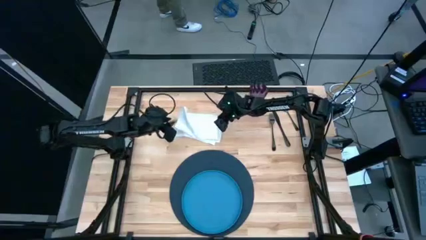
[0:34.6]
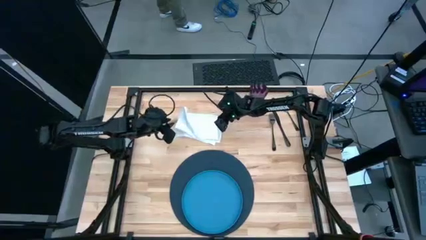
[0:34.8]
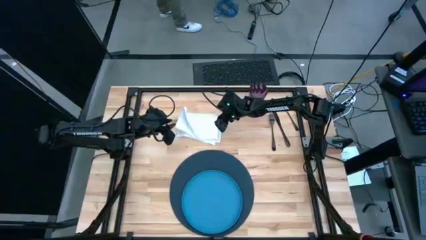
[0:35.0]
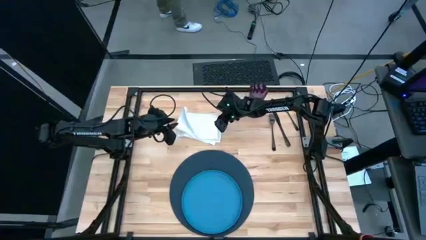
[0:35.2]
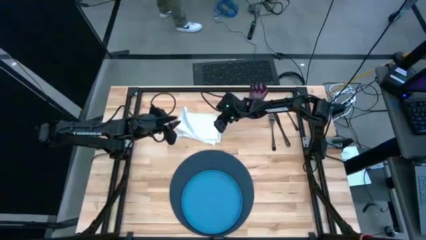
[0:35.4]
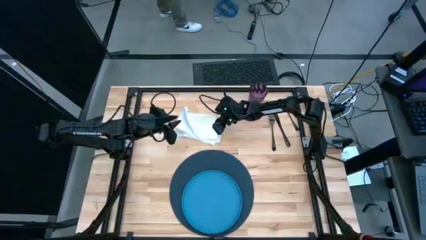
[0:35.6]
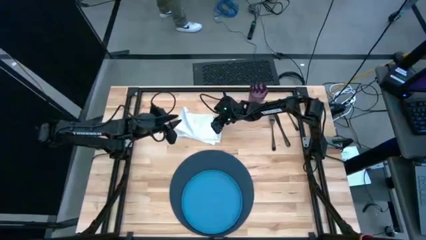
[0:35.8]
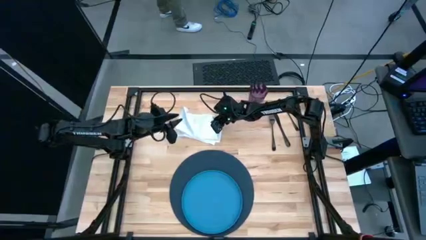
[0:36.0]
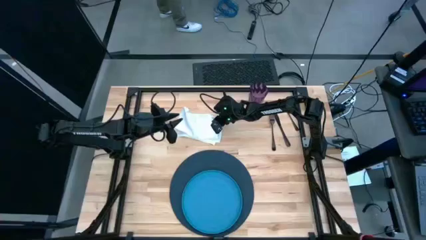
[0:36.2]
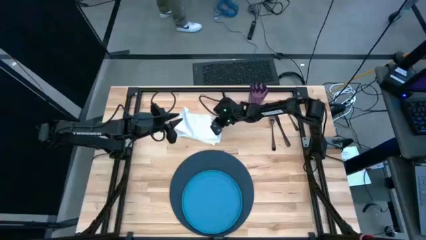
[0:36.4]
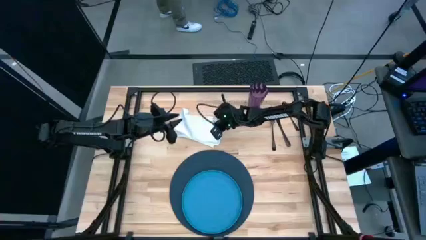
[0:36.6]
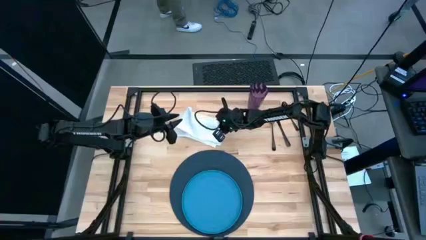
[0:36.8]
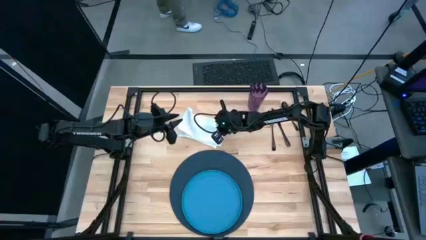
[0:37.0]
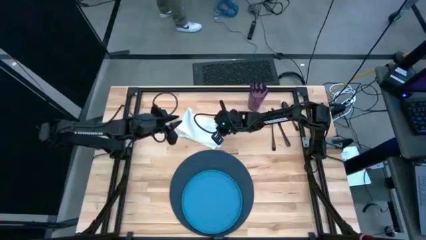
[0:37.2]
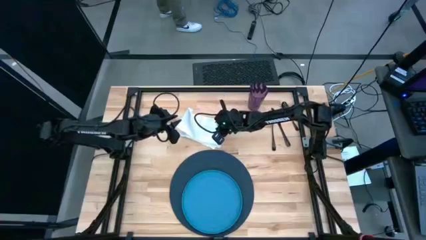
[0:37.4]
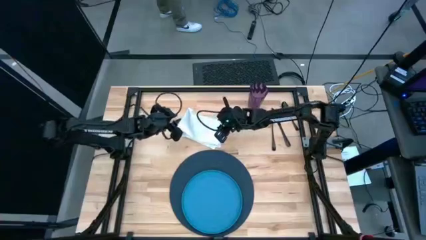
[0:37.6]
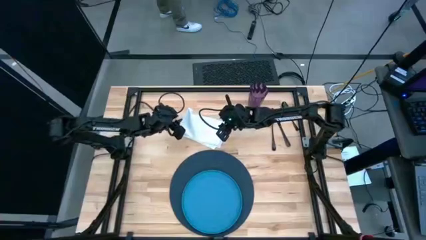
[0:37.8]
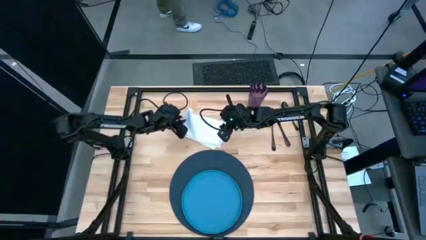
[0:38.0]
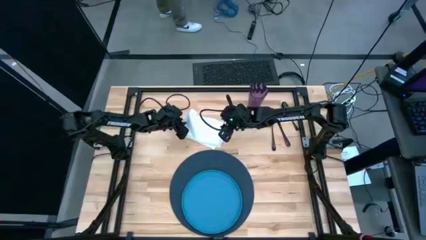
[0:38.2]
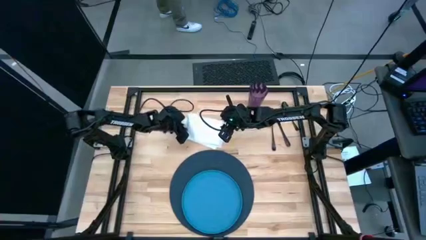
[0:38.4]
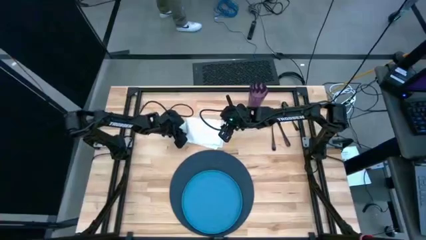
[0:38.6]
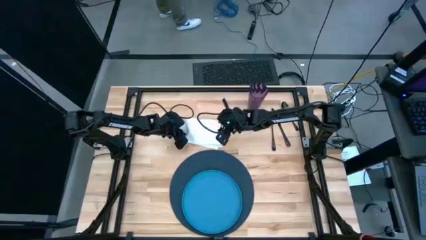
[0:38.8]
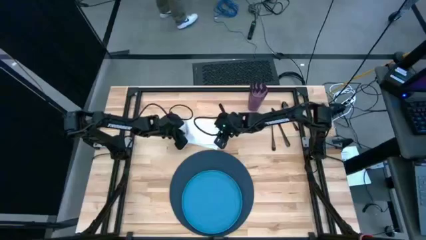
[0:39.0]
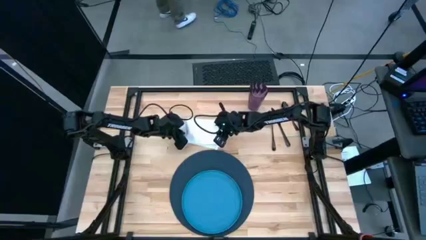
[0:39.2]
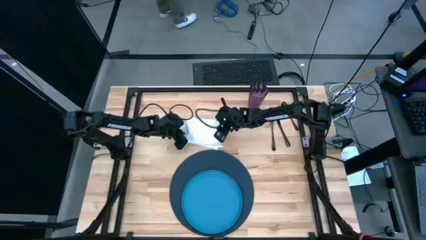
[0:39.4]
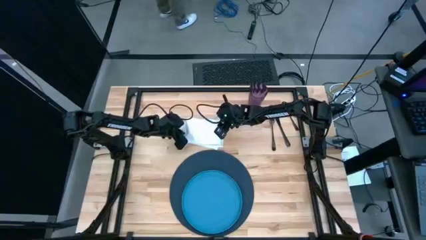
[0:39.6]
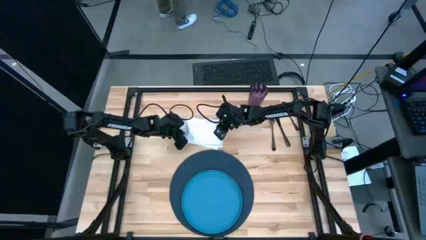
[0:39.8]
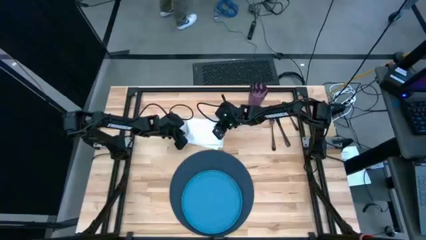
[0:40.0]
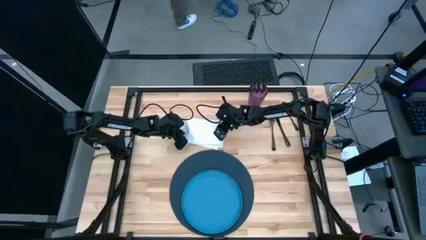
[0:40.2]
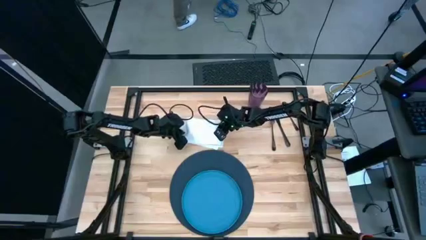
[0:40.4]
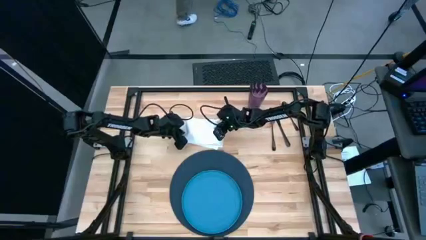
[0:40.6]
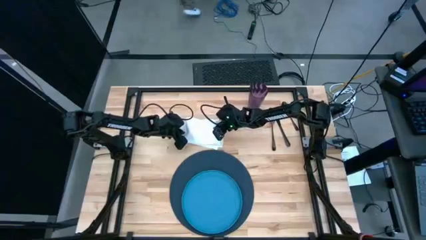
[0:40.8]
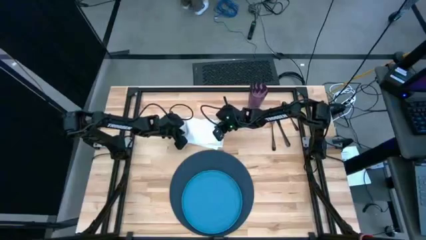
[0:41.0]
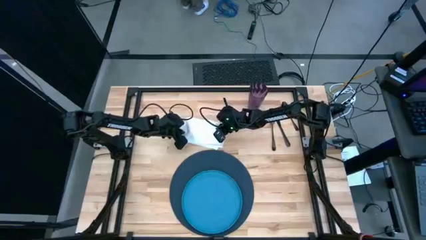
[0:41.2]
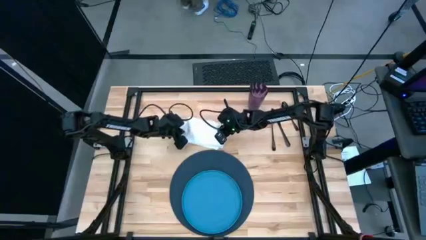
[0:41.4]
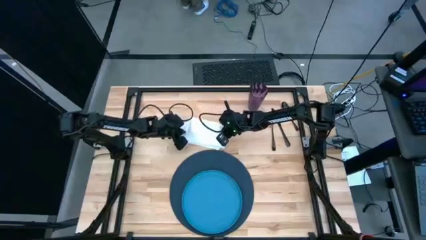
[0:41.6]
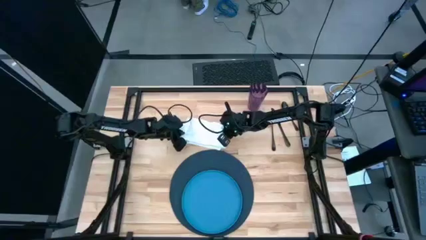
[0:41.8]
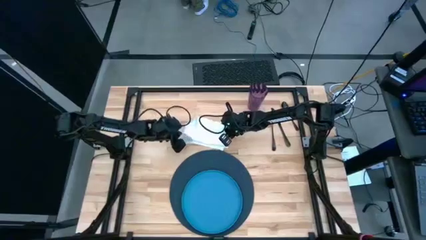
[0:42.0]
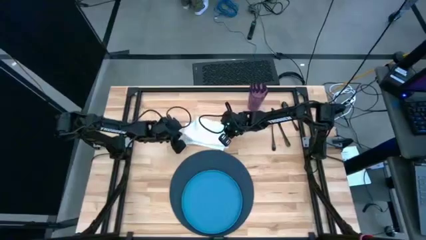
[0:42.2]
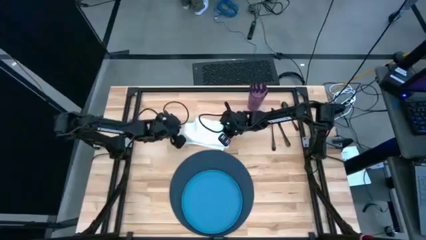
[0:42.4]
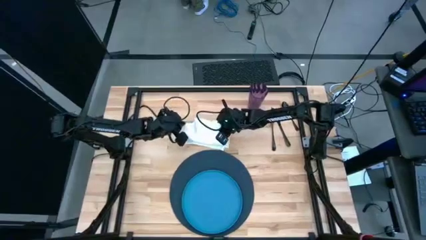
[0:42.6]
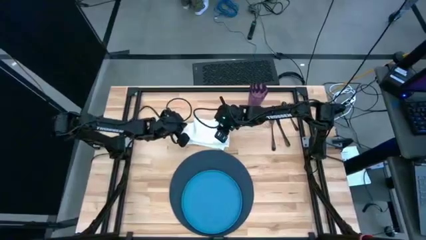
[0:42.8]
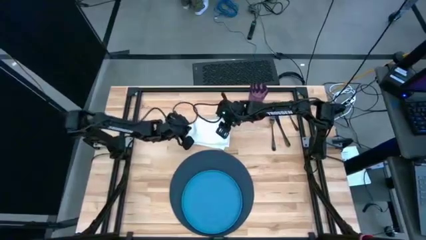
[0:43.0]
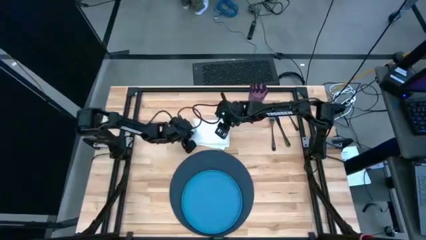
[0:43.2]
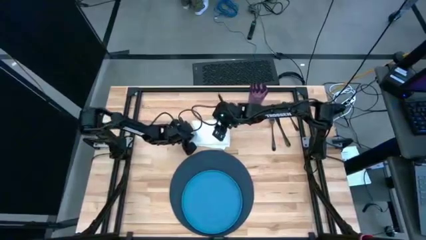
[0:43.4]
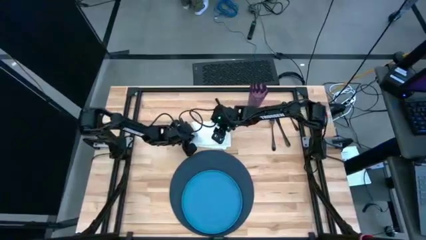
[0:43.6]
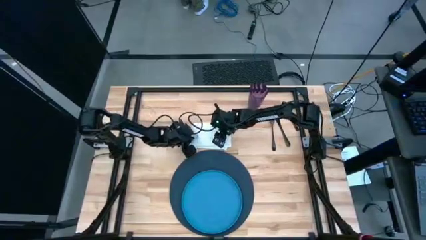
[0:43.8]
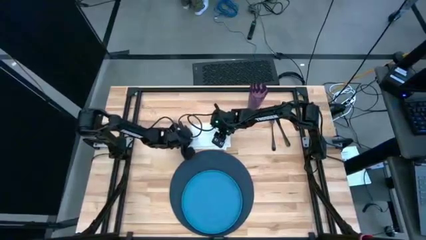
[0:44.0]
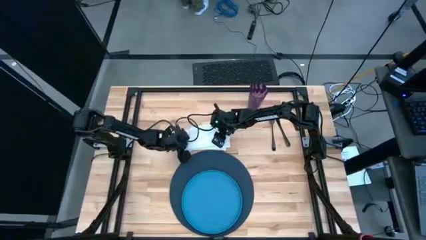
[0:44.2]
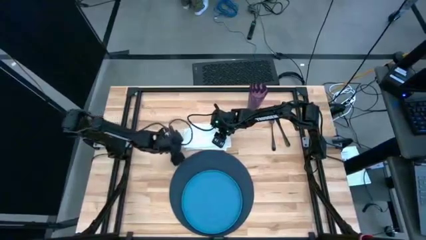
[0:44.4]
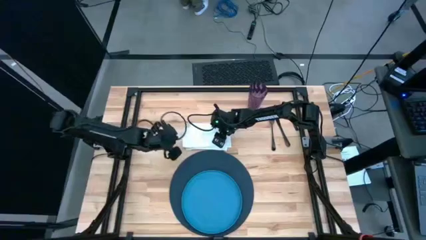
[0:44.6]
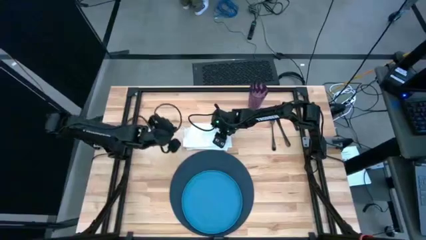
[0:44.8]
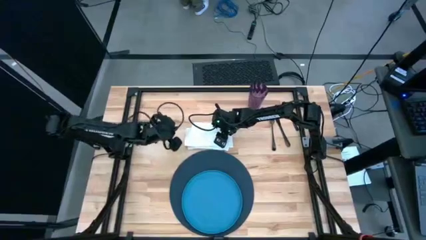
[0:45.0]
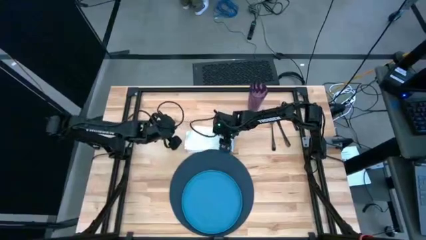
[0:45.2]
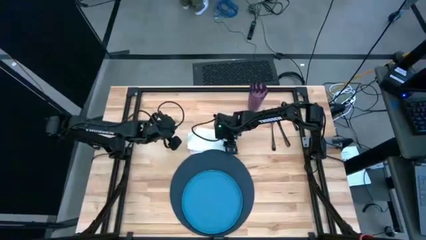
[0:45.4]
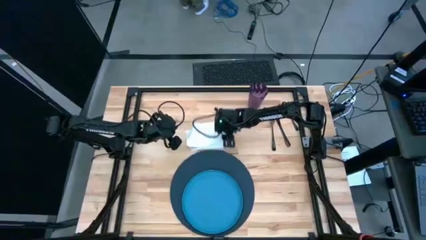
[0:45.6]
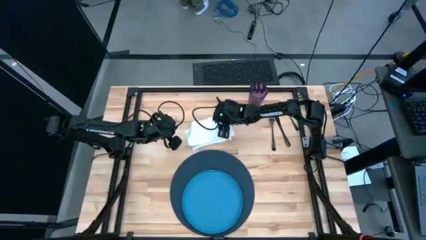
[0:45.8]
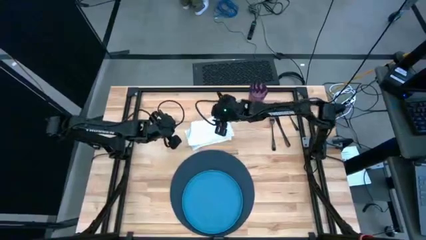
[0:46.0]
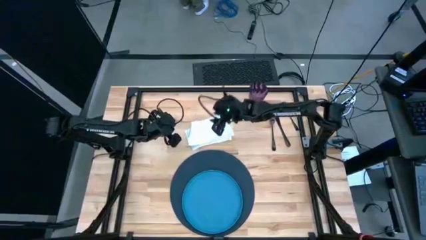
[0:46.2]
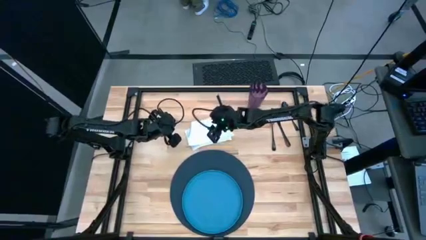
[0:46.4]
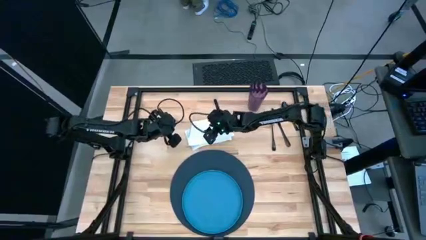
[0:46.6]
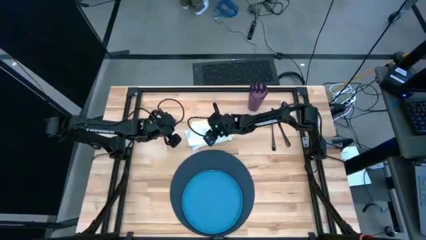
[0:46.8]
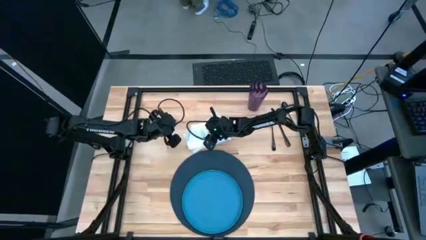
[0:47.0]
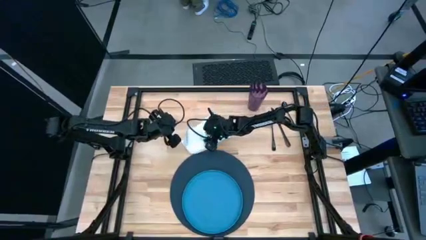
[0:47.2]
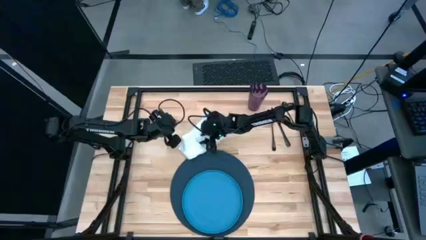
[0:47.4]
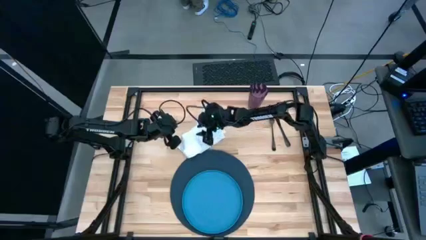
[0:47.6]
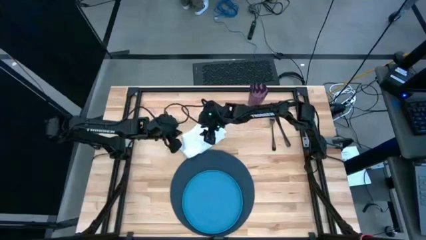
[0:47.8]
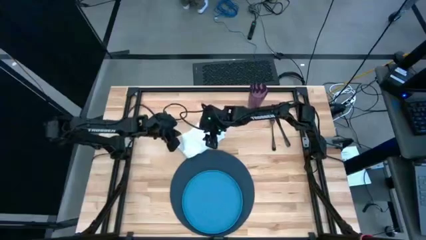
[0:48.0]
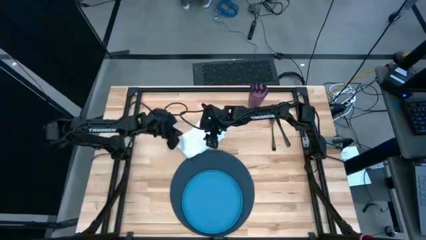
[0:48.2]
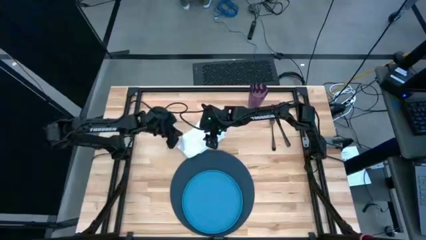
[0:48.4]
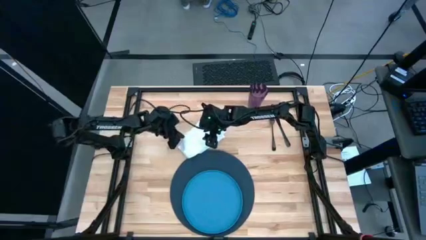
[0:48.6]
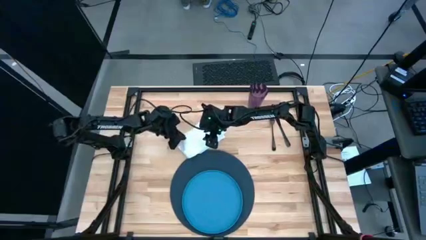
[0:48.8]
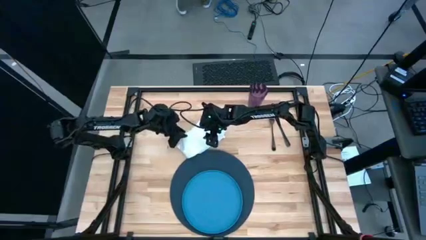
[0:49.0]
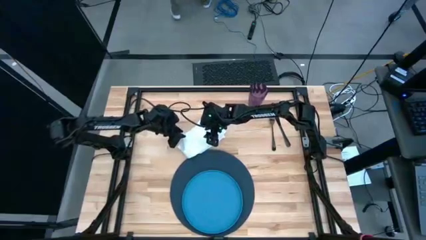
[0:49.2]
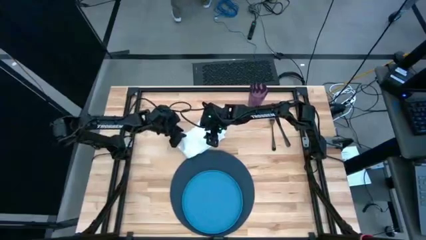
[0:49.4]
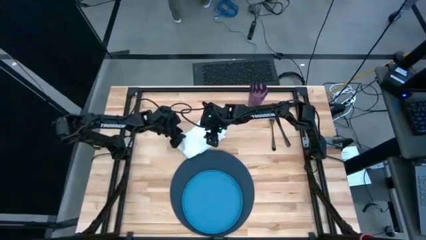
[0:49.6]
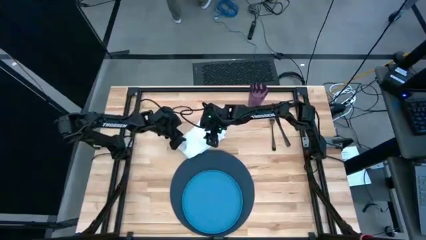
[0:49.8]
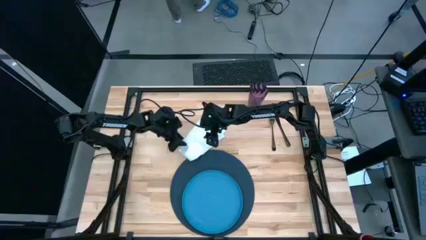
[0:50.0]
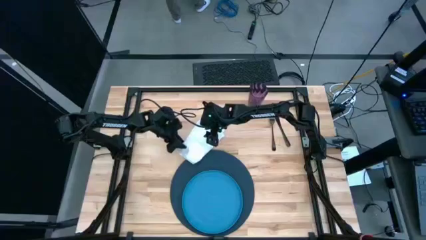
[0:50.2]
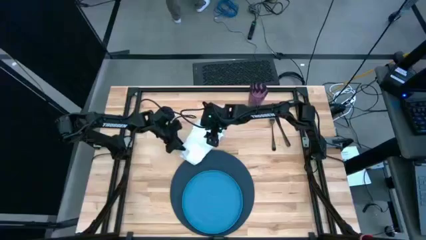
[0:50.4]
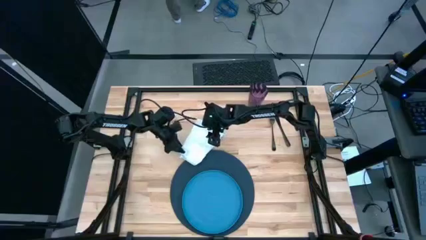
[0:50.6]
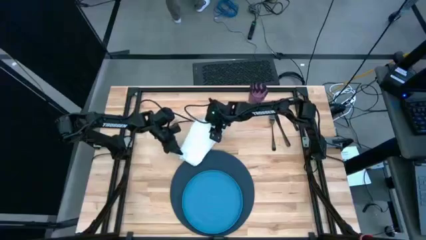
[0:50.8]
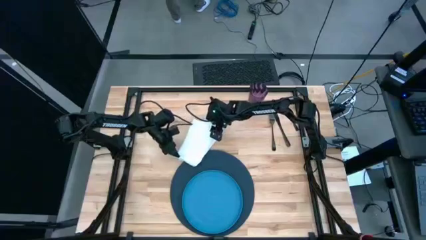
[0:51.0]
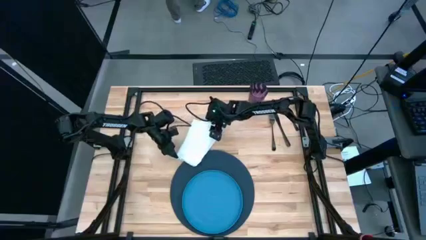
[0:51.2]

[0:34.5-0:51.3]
Task: Set table place
Fold the table napkin
